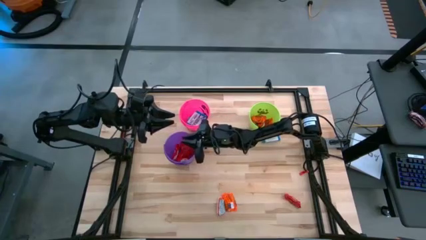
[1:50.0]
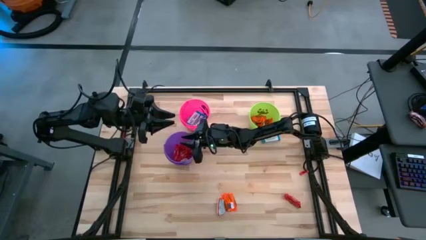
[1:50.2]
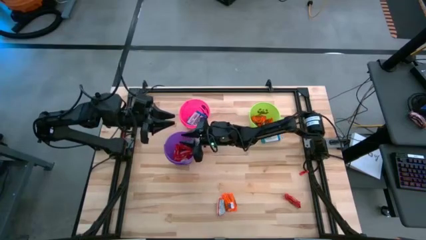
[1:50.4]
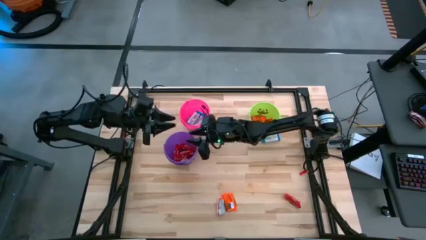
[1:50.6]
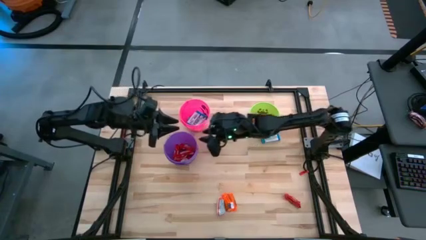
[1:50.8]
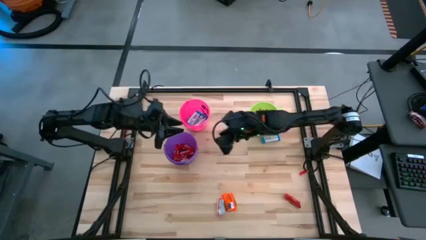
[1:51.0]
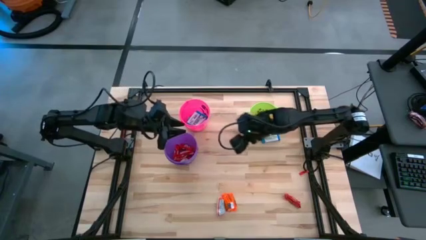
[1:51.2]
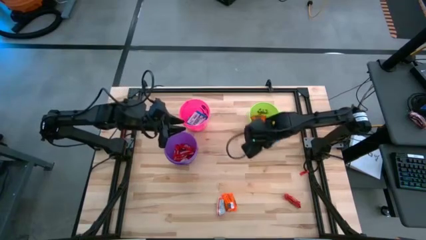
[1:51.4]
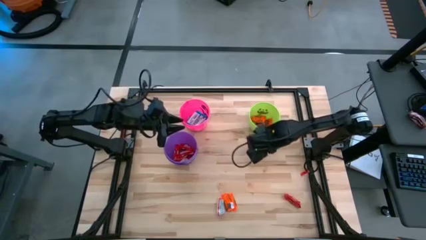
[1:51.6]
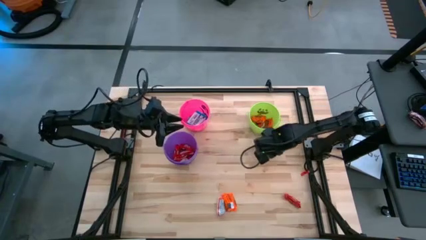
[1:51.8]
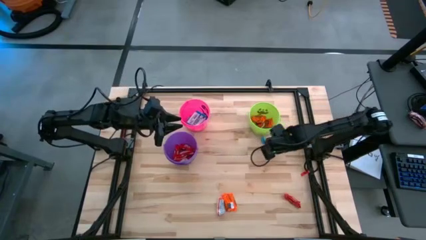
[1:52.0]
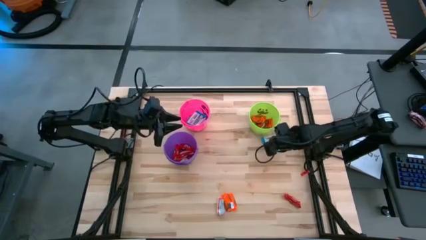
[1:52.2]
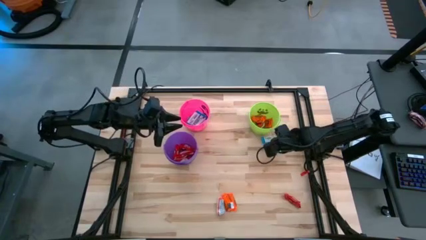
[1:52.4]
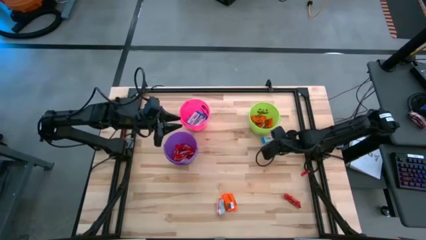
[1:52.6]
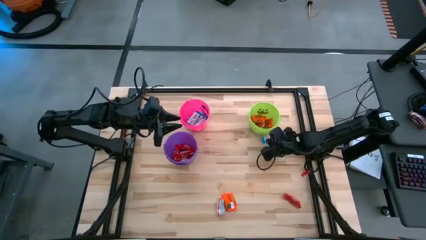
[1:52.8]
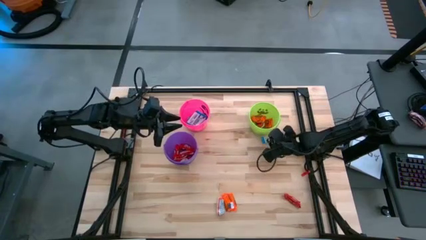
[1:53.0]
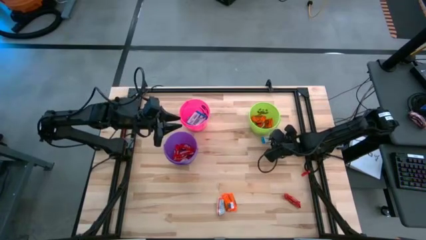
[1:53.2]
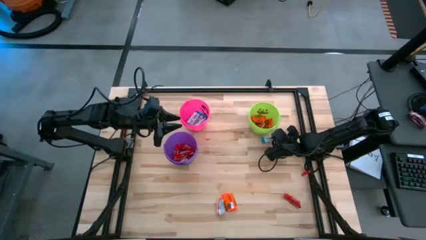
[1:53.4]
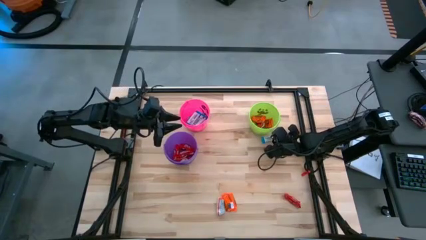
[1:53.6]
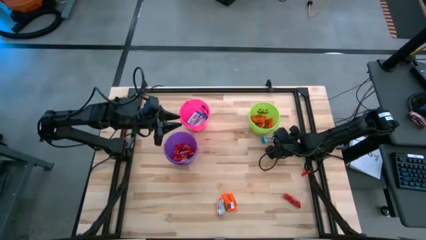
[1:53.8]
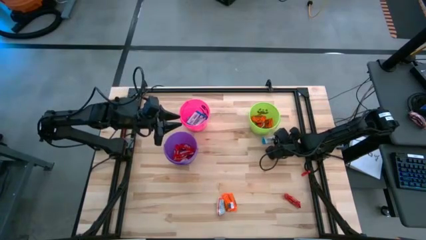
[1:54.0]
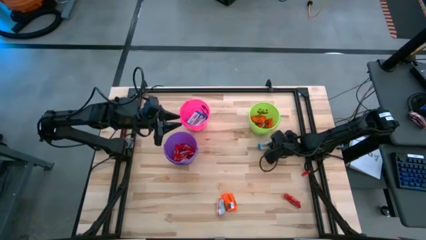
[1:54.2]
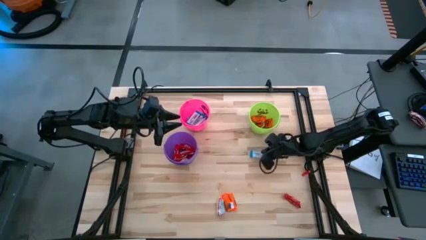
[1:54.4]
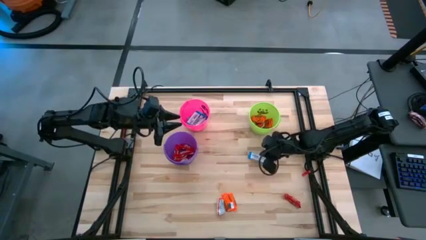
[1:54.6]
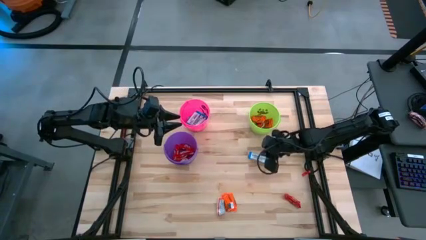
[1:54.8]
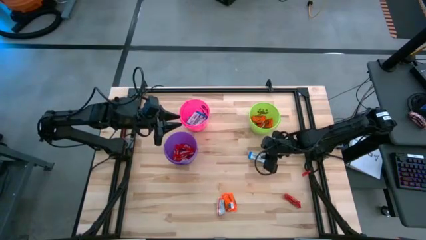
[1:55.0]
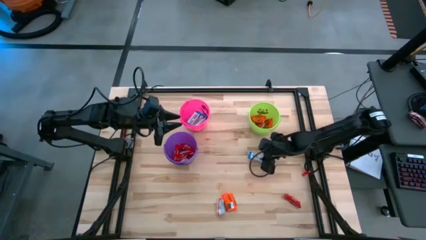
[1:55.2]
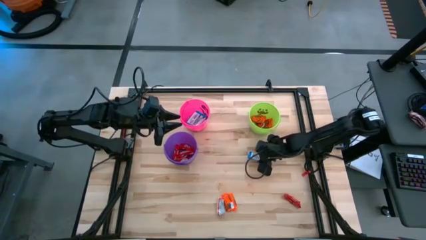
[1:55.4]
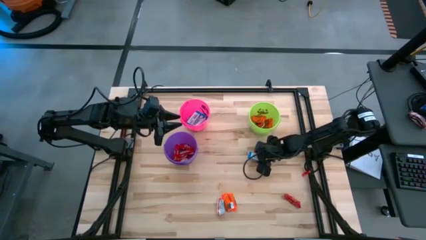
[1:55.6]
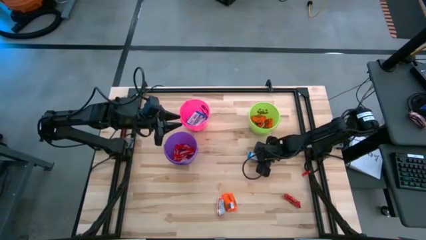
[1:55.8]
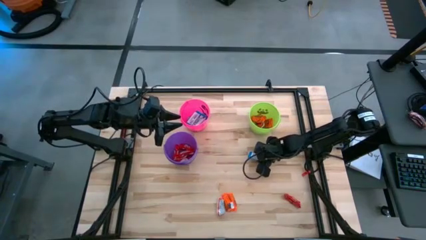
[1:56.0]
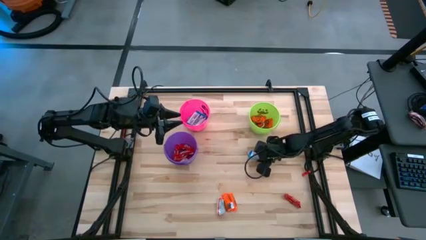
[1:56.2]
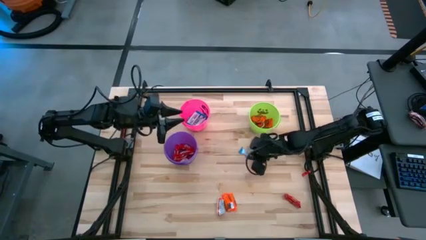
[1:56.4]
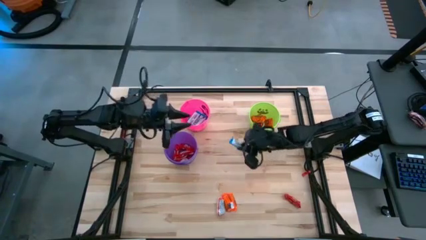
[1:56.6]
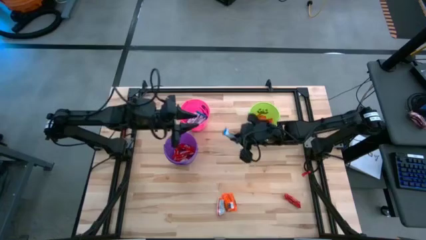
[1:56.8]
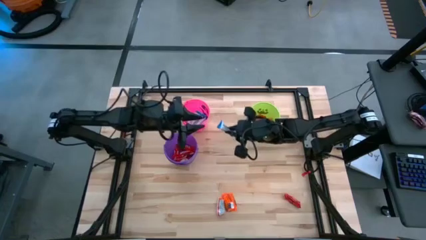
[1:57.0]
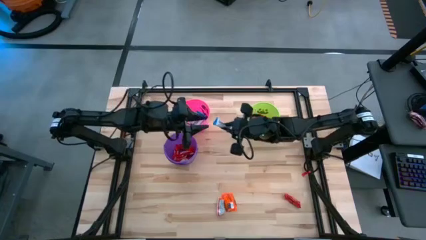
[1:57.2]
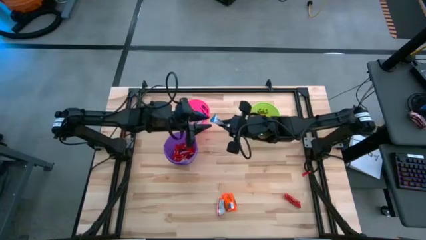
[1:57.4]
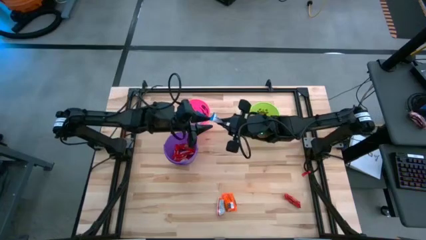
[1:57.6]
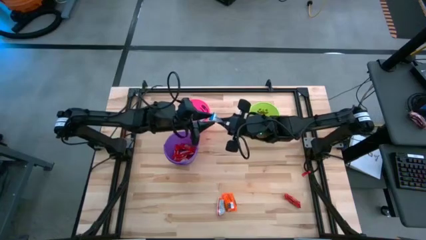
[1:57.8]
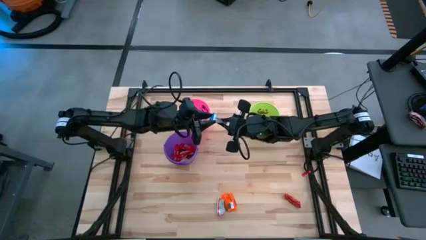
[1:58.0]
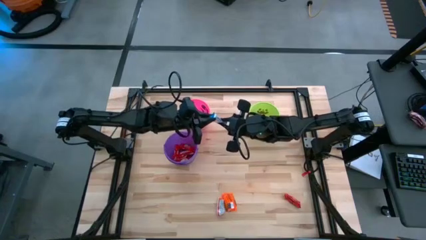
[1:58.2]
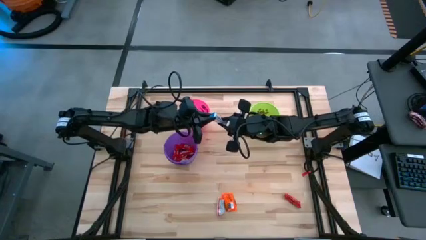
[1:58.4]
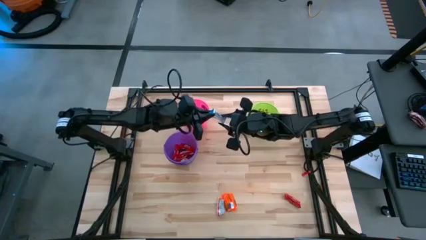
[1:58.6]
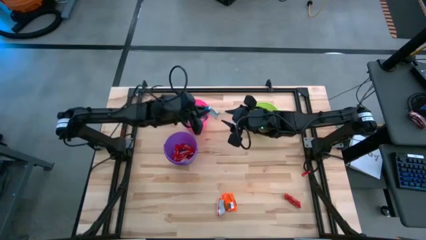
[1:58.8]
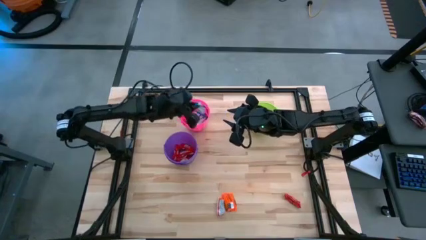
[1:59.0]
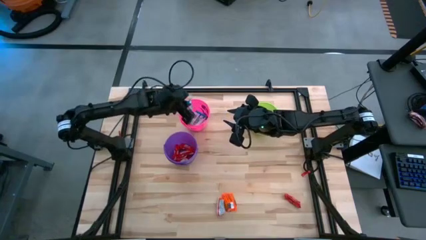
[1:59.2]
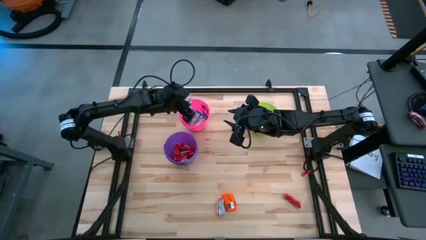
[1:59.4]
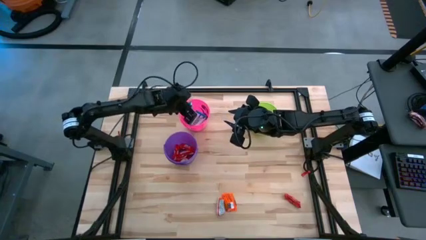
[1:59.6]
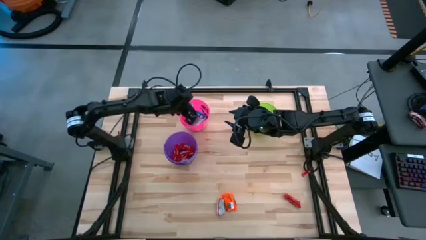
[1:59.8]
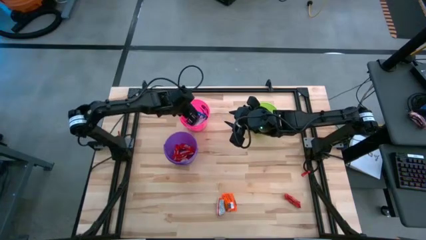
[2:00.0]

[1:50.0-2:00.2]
Task: Sort candy
Put the white chocolate into the pink

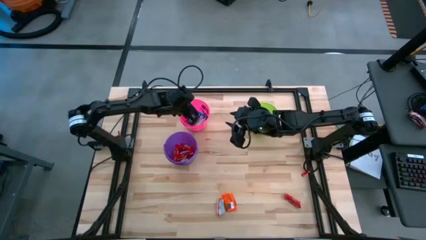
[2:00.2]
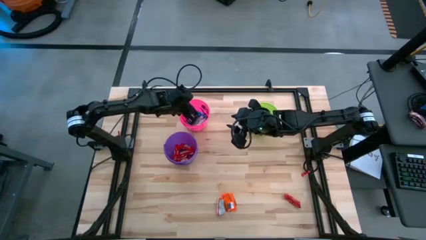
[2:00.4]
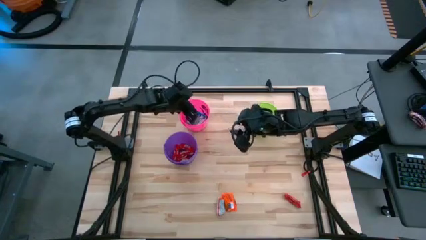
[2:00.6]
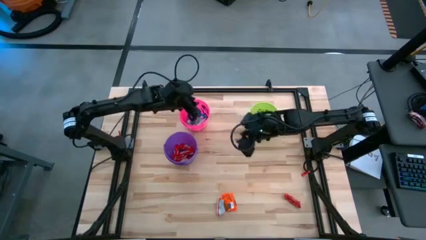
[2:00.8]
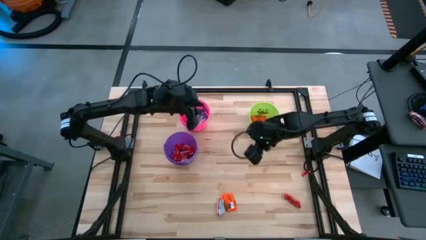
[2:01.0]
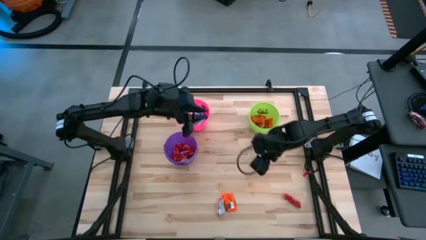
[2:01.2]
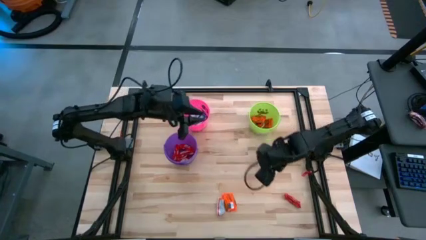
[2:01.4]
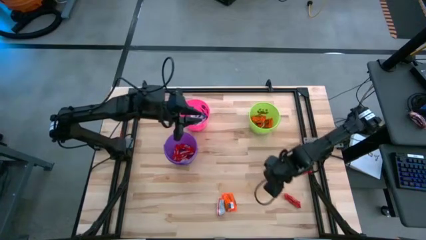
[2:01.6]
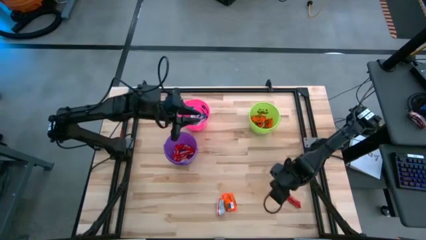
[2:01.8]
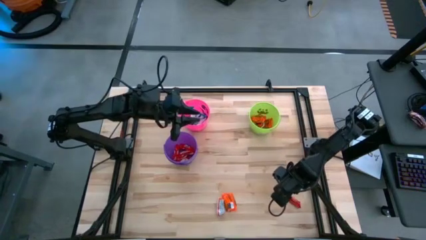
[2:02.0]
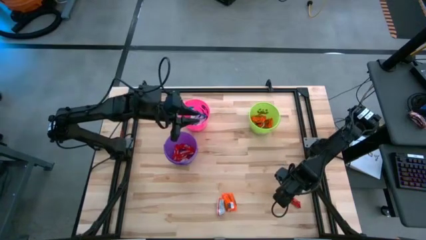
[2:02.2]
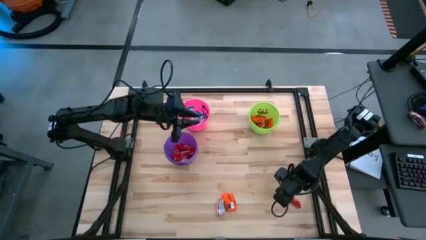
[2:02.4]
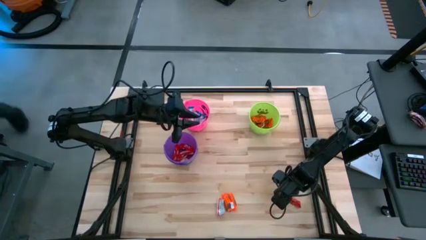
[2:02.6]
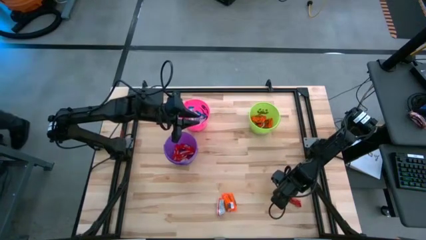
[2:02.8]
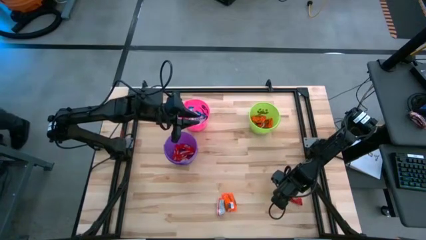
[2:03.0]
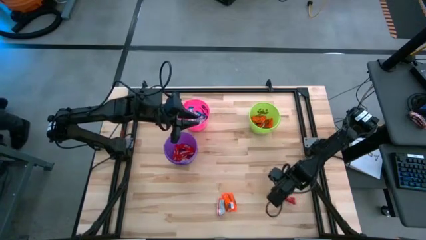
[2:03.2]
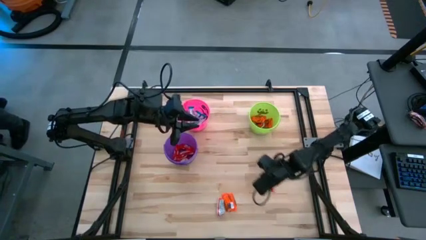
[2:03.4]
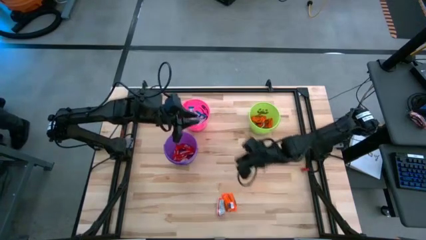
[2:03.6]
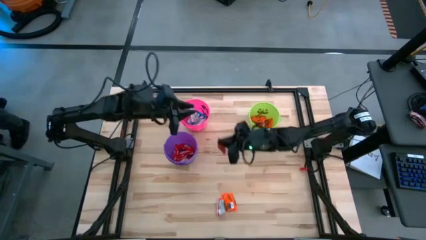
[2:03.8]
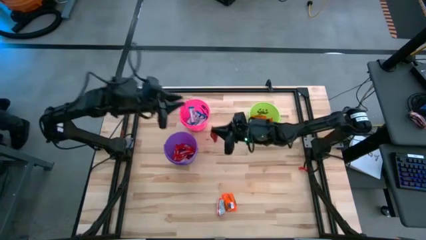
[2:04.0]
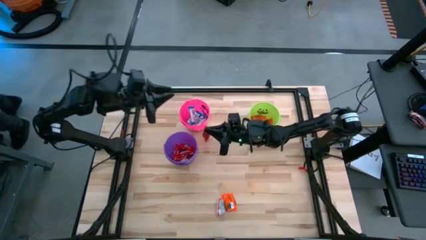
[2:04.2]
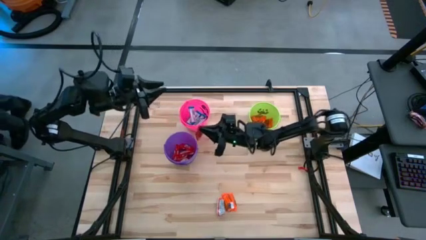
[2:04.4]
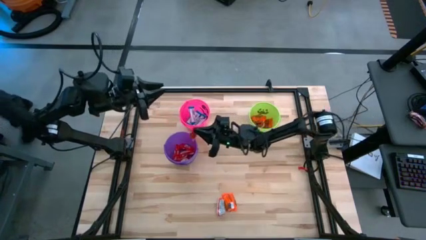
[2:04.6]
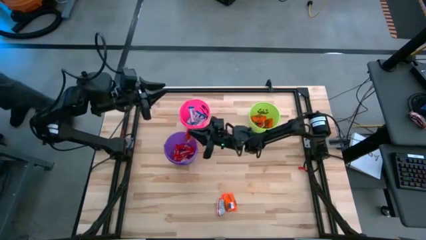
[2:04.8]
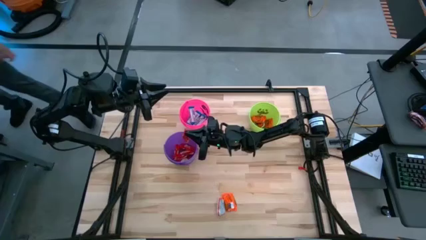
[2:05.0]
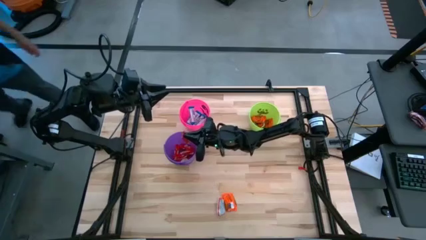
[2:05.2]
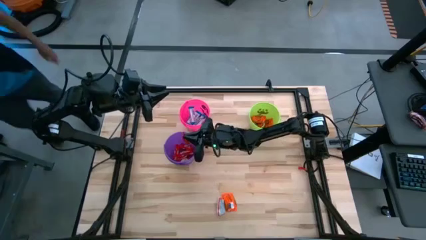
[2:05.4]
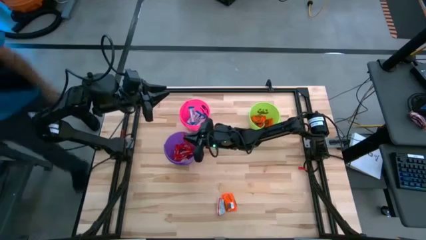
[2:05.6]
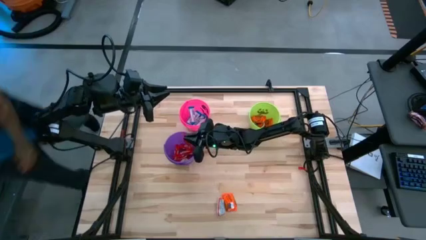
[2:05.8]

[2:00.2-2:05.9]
Put the red chocolate into the purple bucket
